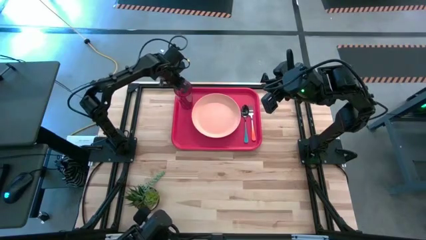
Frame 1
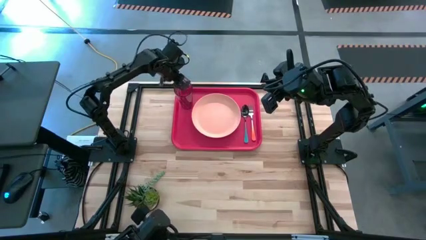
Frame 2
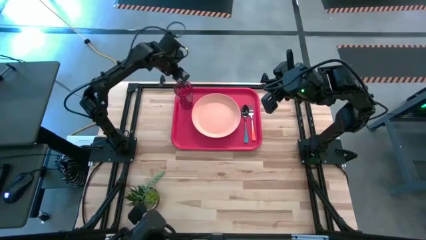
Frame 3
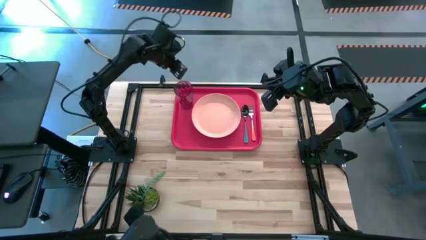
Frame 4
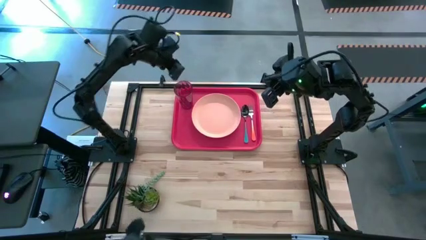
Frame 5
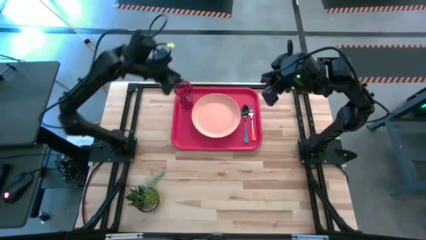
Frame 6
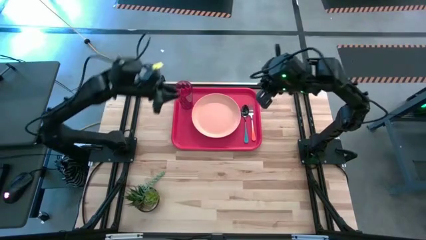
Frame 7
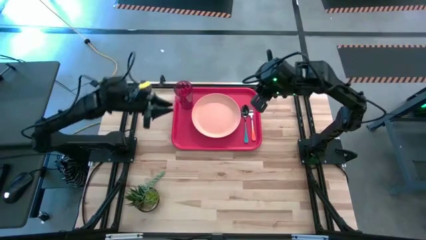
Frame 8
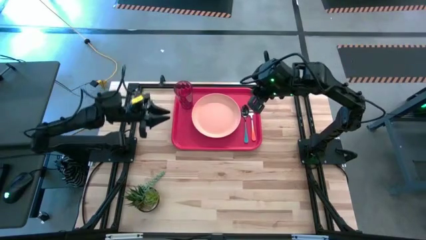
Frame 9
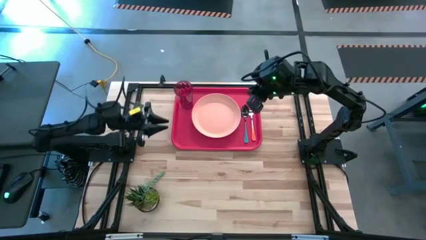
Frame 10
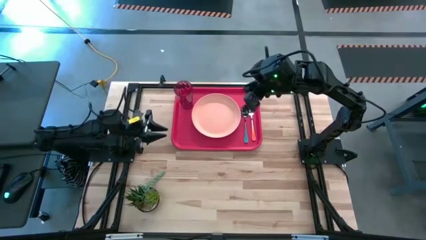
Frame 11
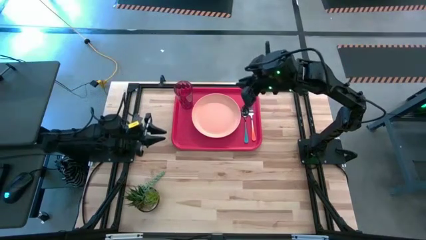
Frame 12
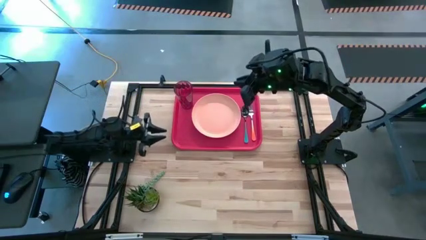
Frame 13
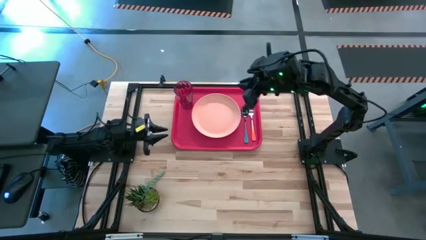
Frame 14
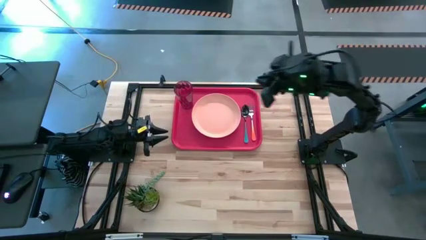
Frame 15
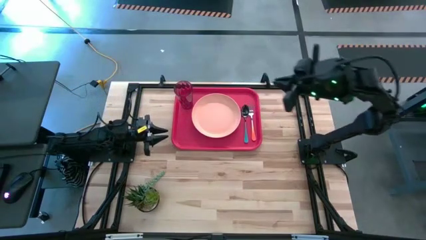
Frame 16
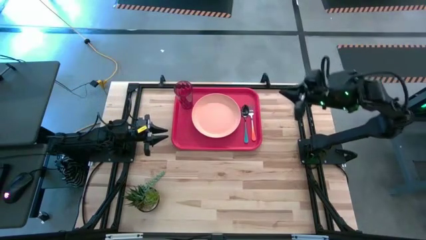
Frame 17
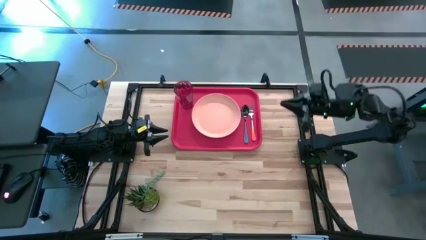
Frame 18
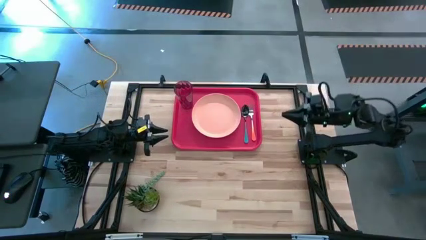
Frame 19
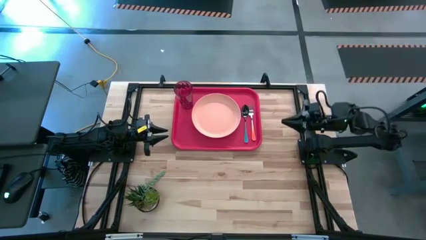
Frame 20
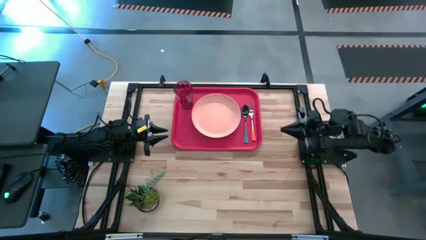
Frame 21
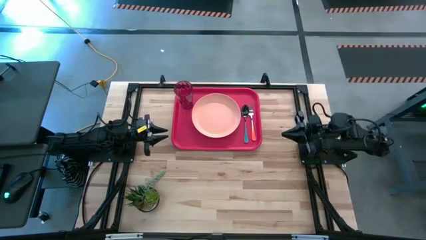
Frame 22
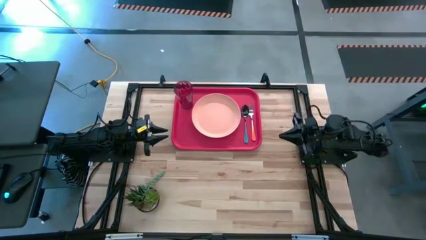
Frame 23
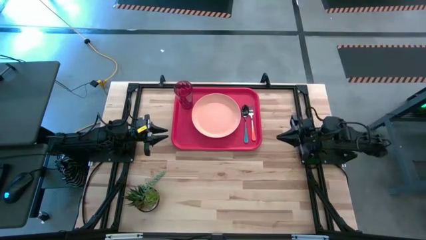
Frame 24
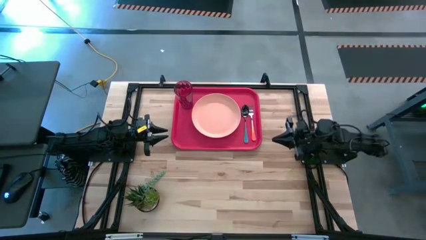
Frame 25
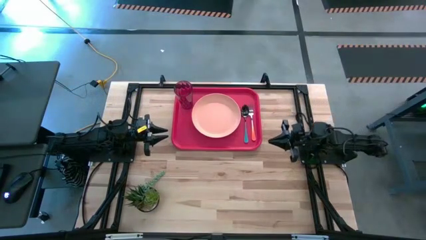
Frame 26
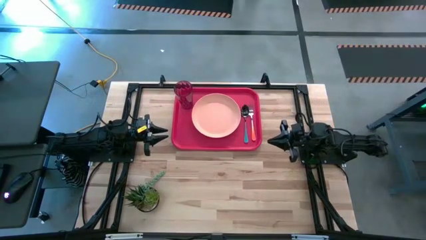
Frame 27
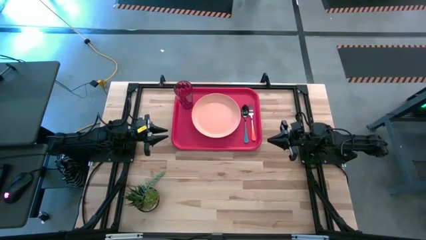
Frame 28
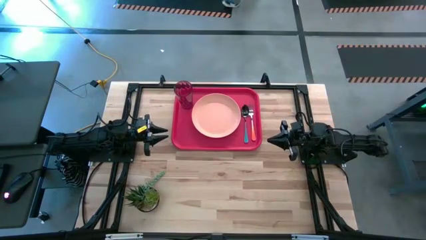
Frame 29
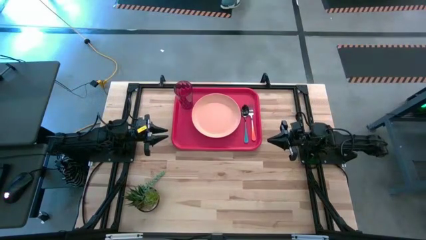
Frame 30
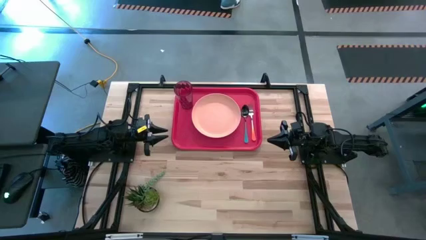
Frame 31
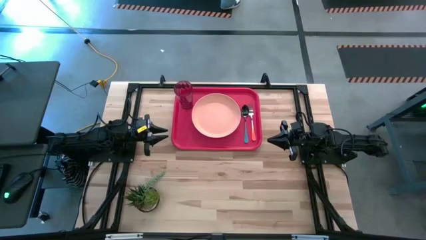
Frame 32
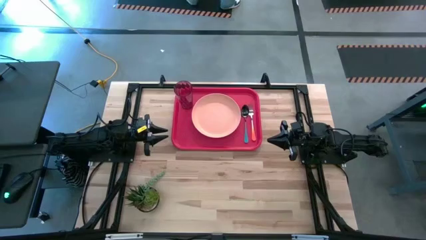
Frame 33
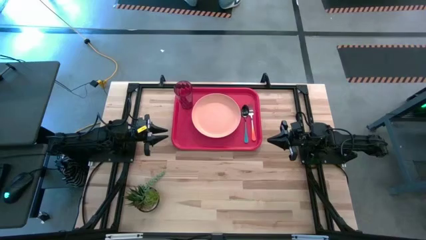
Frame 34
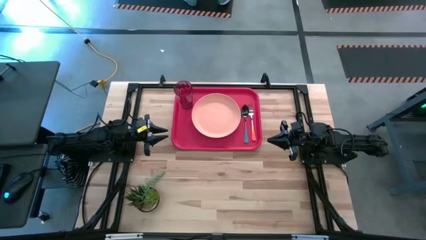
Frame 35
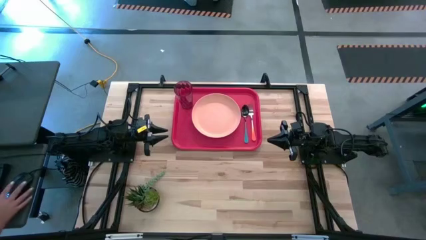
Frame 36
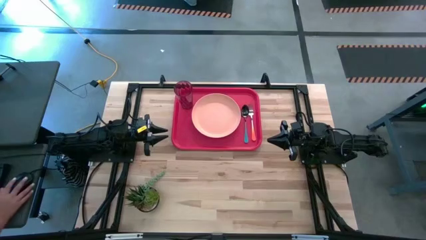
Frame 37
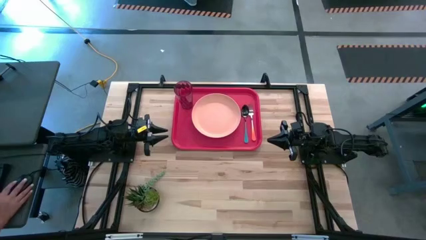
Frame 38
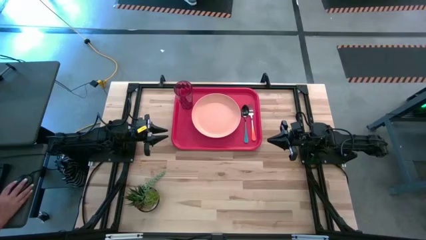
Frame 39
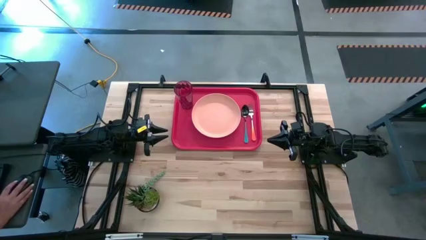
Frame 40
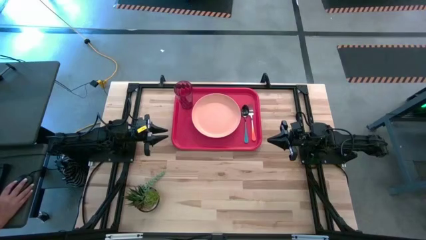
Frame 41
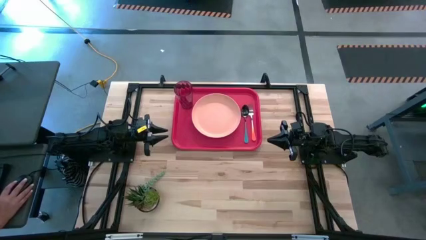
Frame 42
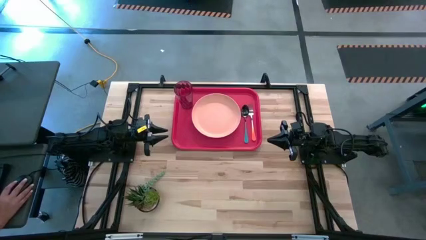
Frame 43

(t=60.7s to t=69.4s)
Task: Pick and place plate/cup/fork/spoon on tray
Return to Home Position

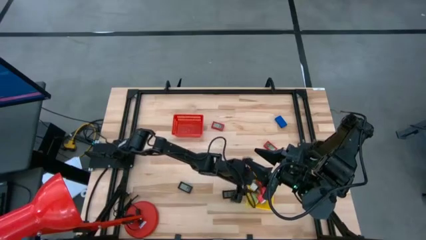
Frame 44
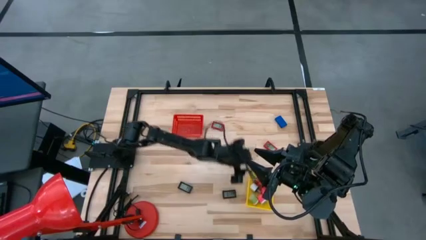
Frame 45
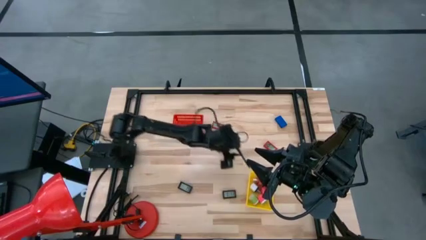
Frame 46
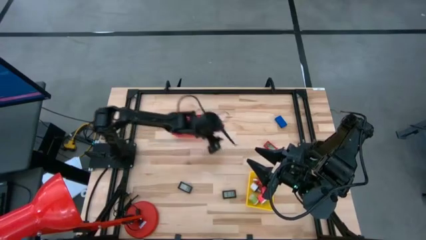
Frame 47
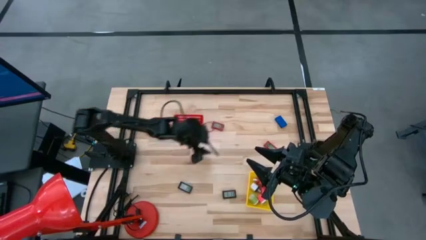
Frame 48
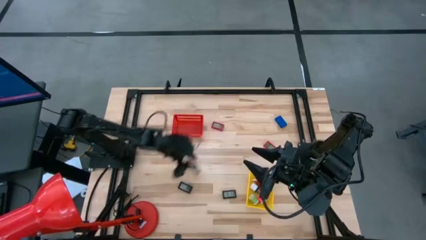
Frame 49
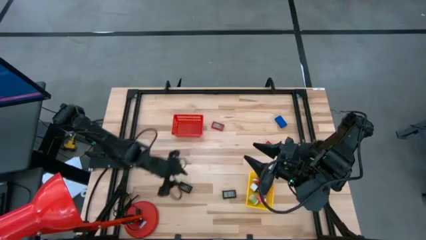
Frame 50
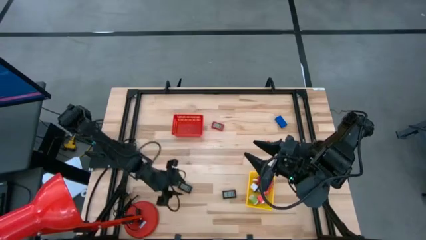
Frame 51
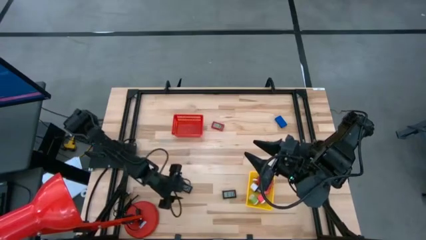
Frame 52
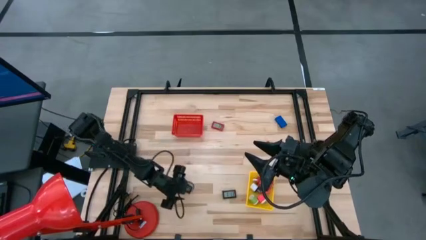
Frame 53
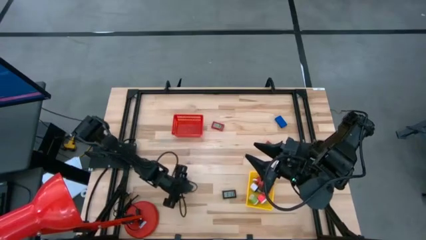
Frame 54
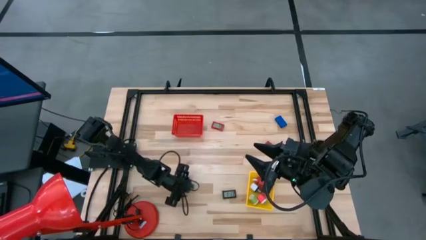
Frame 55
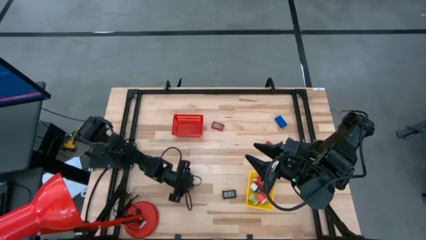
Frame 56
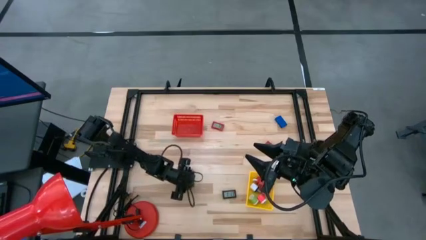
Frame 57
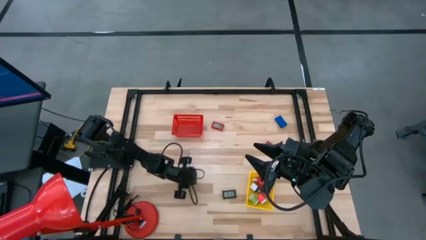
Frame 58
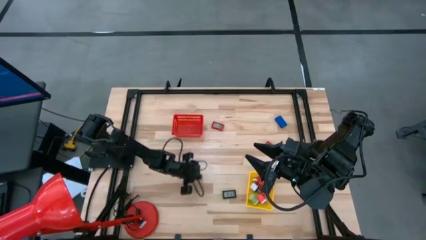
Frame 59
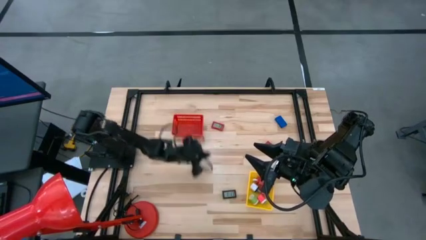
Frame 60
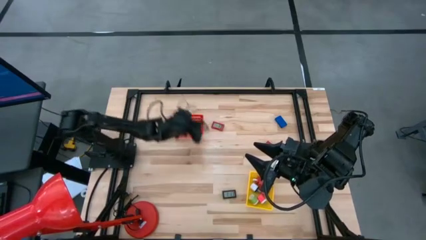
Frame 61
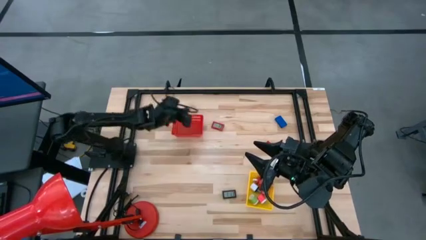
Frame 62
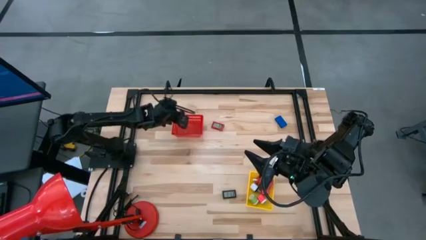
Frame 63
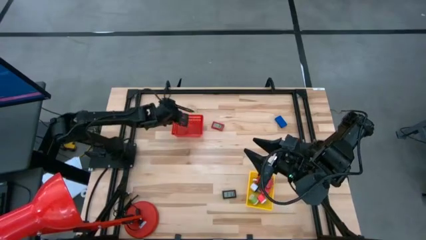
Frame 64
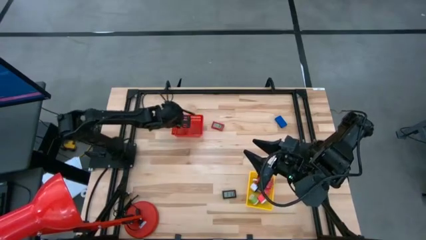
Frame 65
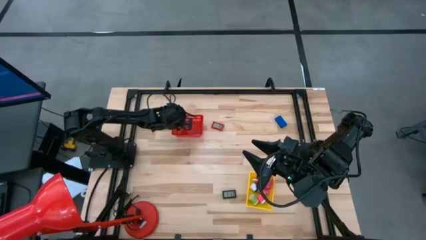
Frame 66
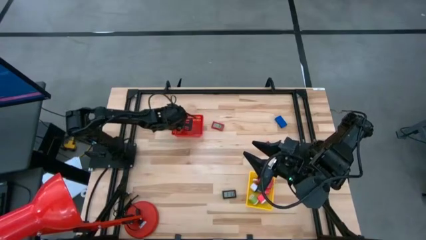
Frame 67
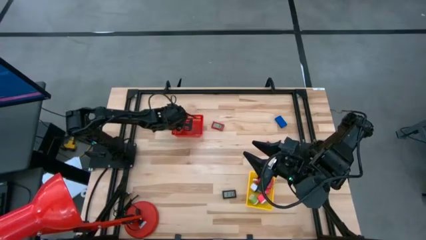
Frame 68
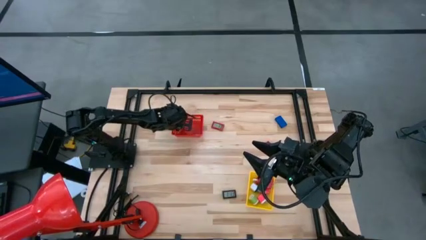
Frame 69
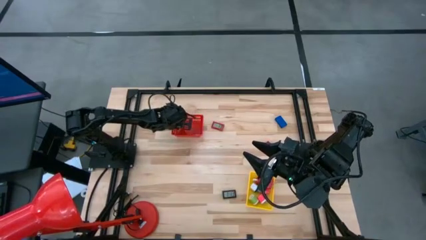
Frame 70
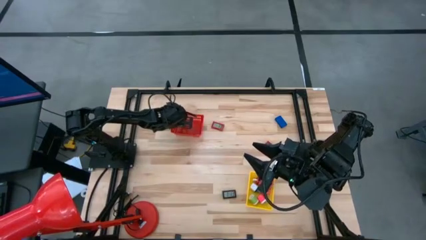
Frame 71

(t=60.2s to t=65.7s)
Task: Pick & Place Office items
Put the left black digital clock in the red basket
